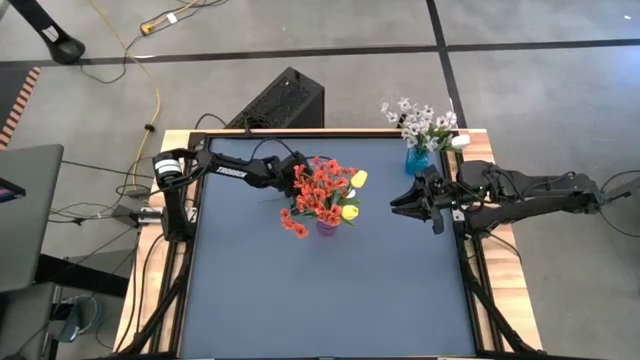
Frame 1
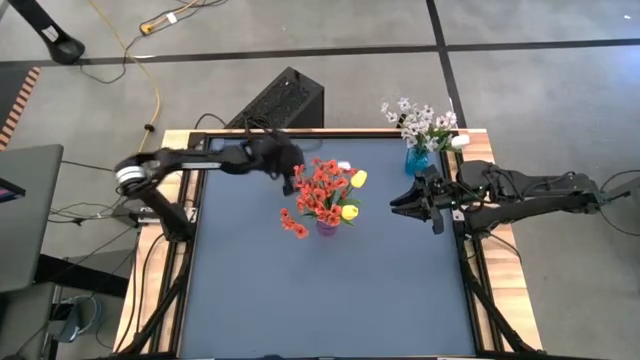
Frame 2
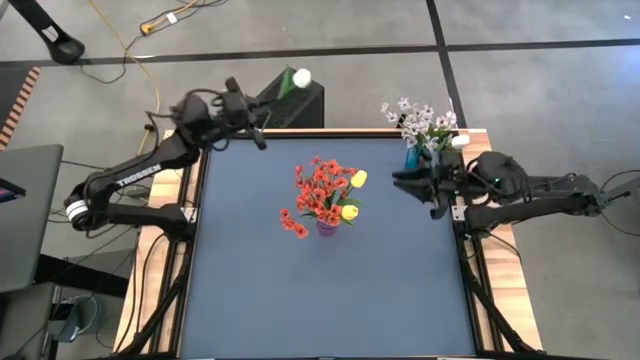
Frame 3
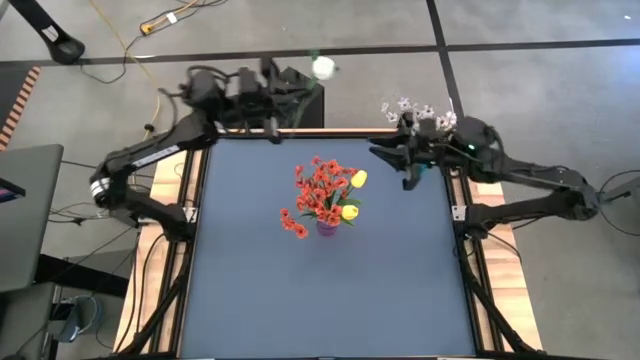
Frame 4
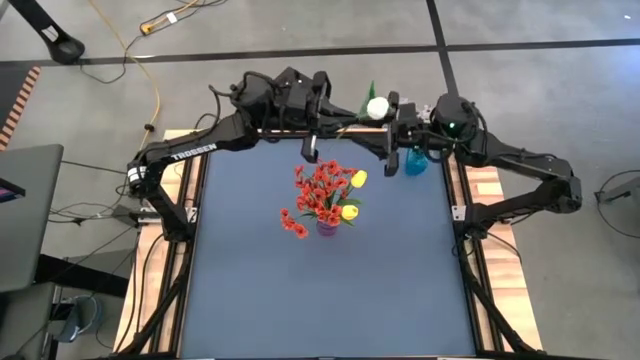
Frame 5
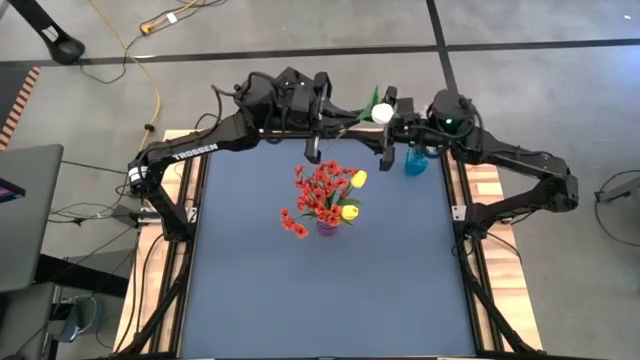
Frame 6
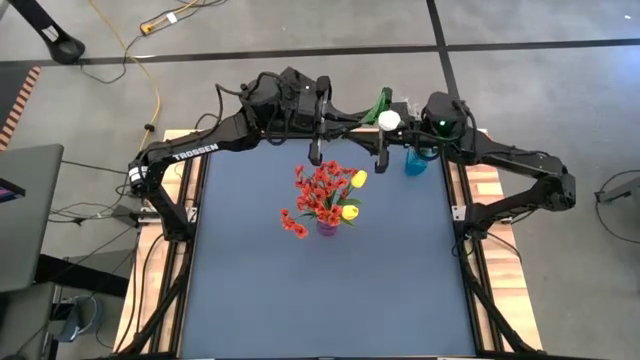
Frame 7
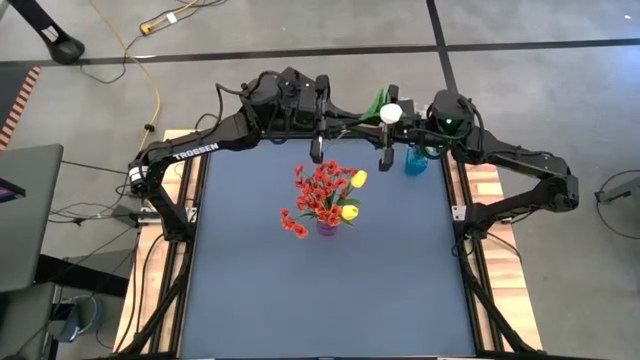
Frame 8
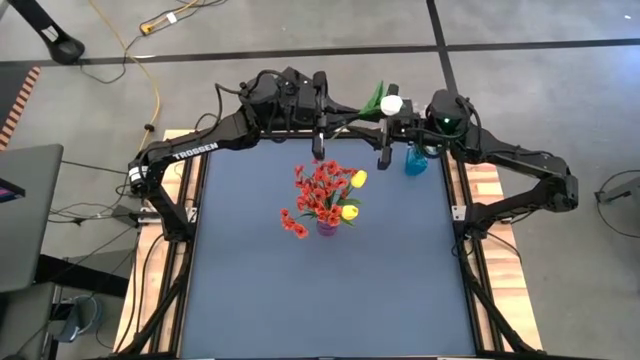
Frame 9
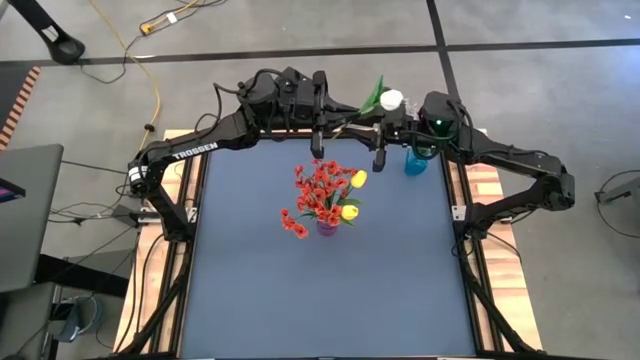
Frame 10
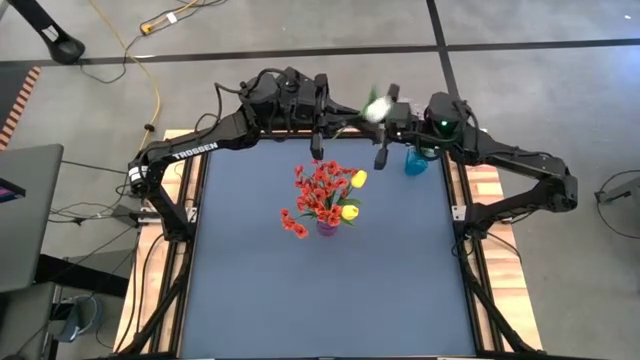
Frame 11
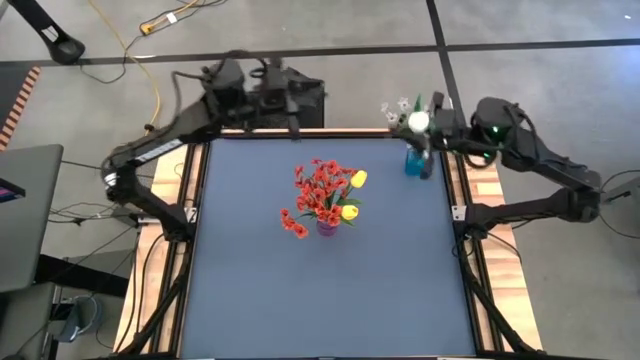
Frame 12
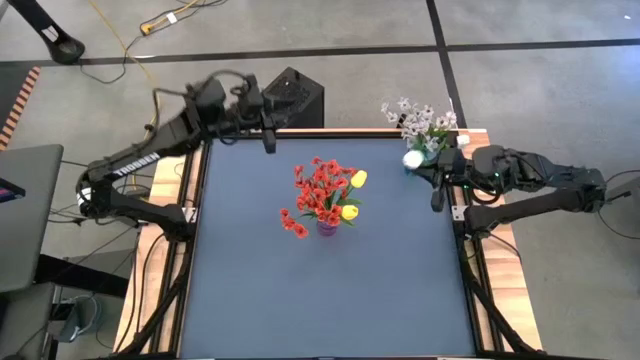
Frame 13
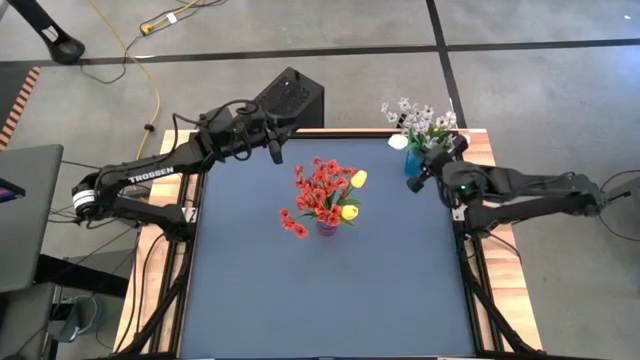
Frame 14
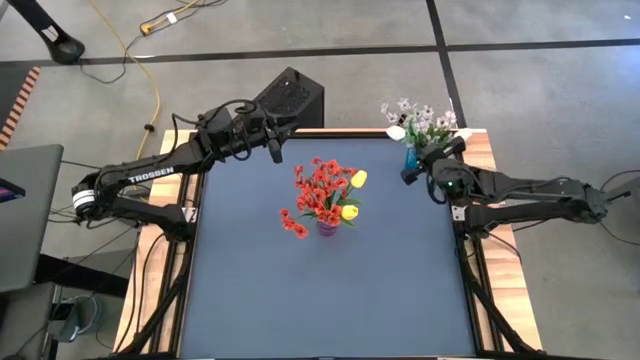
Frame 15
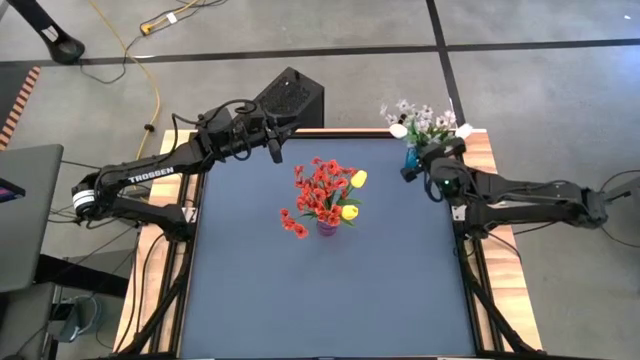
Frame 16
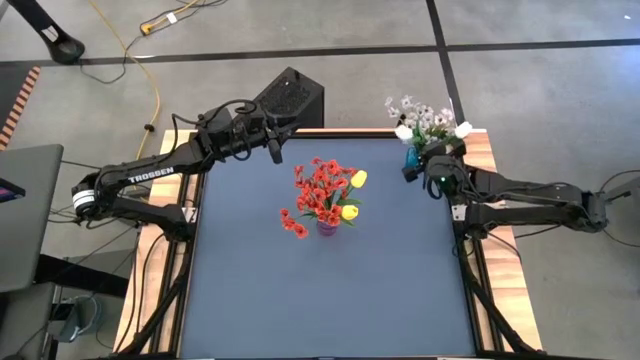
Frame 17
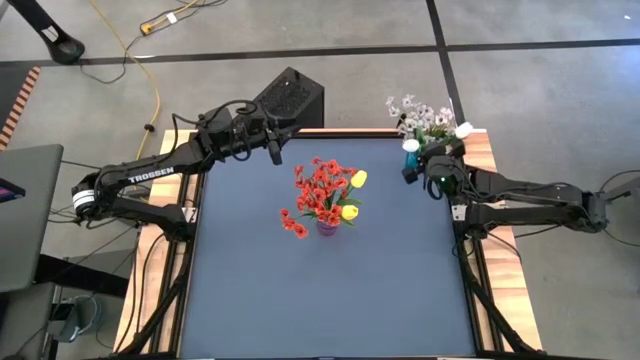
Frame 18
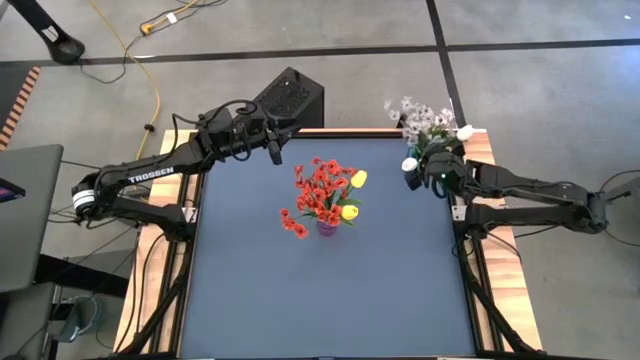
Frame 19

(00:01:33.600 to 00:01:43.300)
Task: Sort flowers into vase by color
Put the white flower into the blue vase

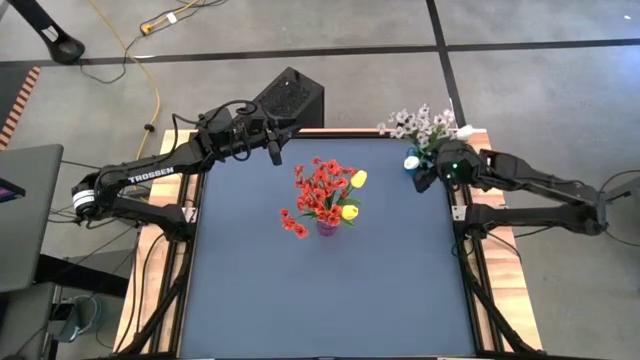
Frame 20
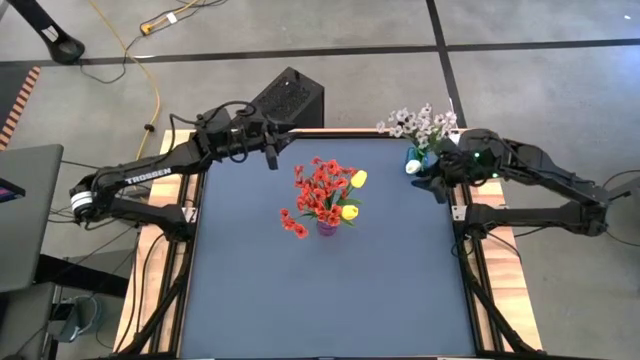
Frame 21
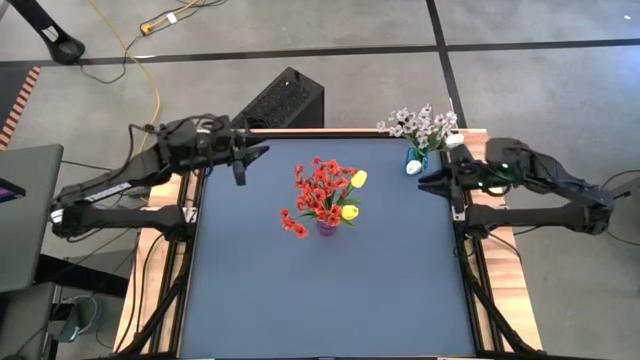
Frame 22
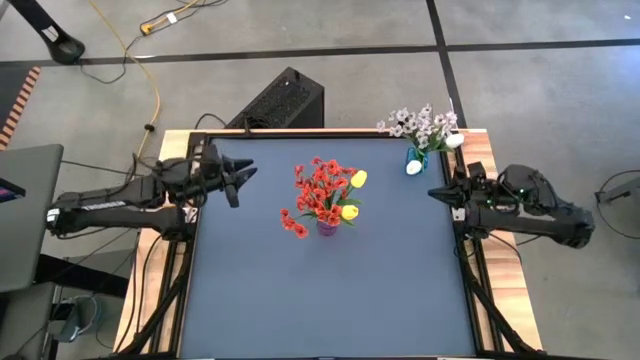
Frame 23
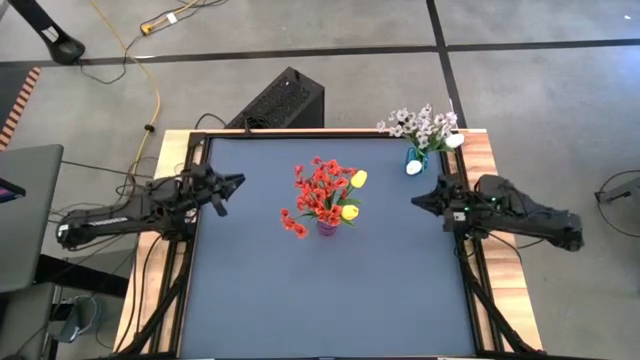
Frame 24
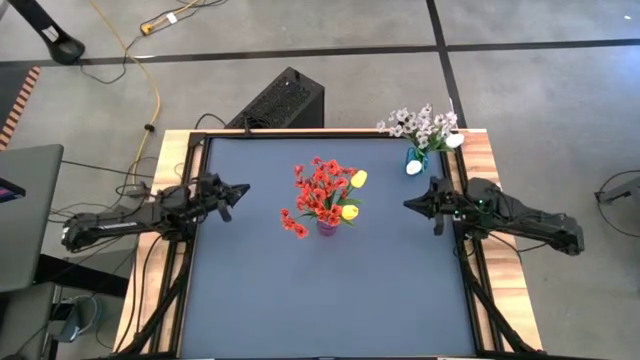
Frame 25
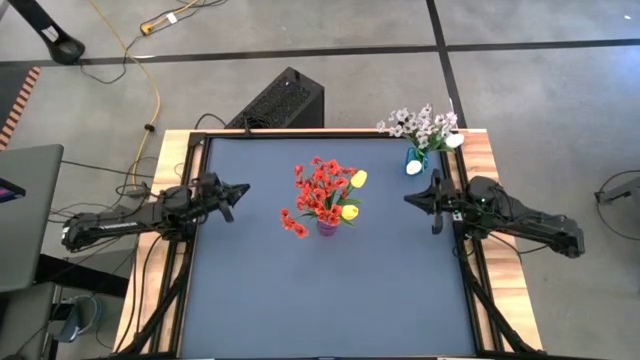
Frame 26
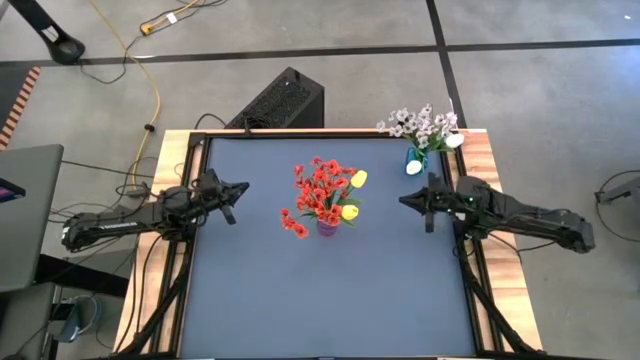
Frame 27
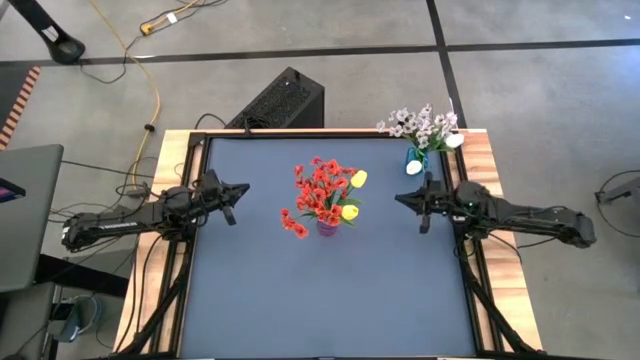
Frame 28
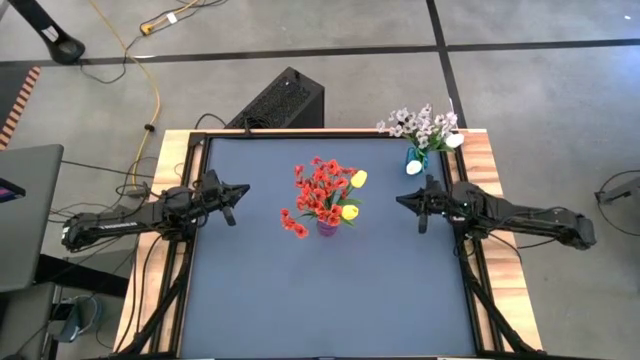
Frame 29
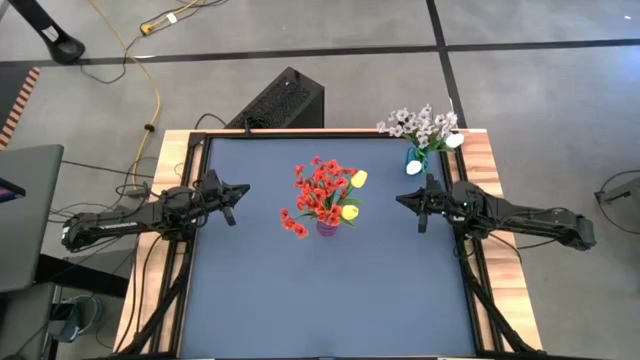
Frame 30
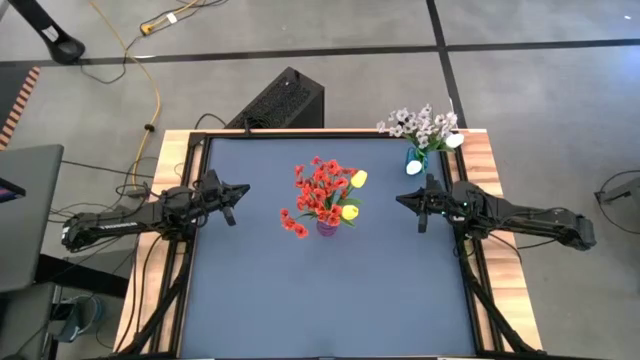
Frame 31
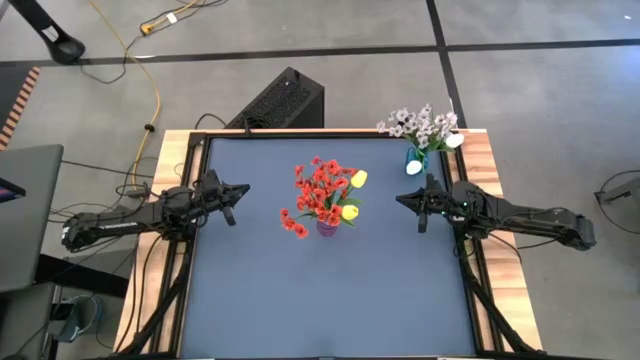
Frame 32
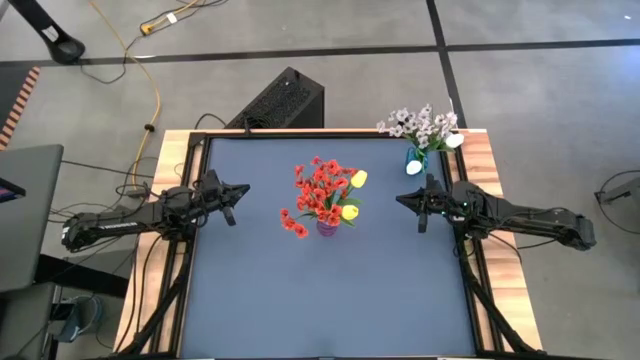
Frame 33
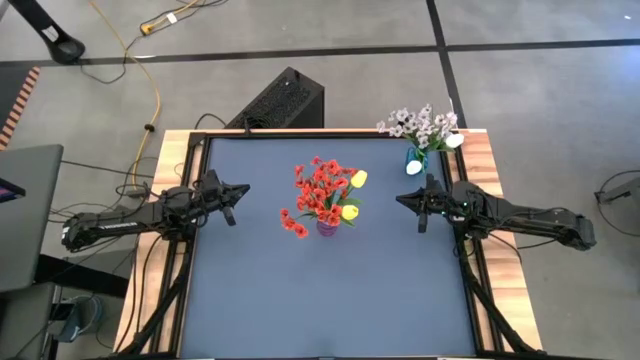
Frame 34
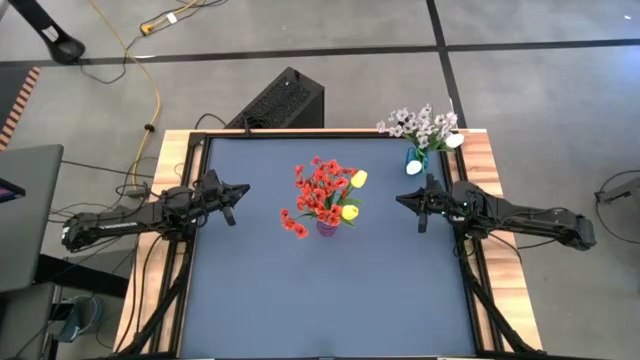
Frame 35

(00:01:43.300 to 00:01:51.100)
Return to Home Position

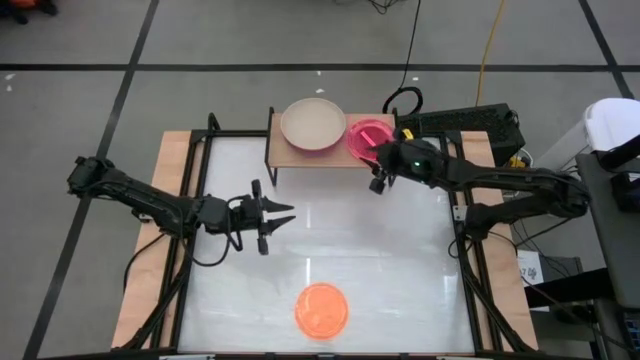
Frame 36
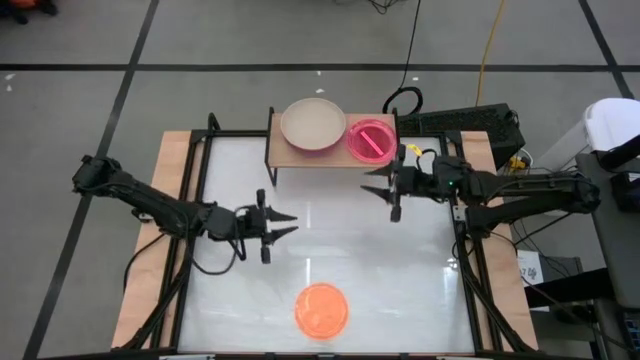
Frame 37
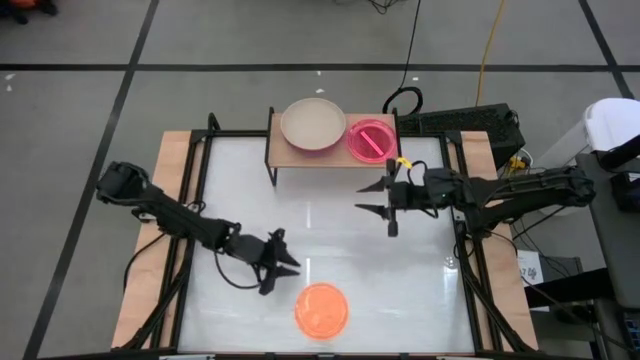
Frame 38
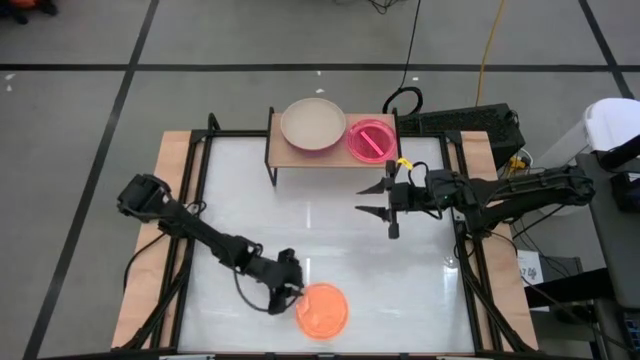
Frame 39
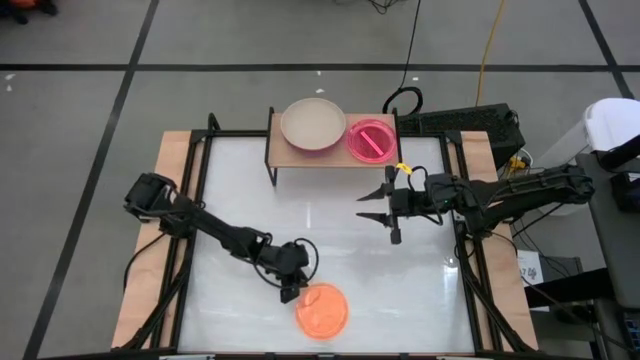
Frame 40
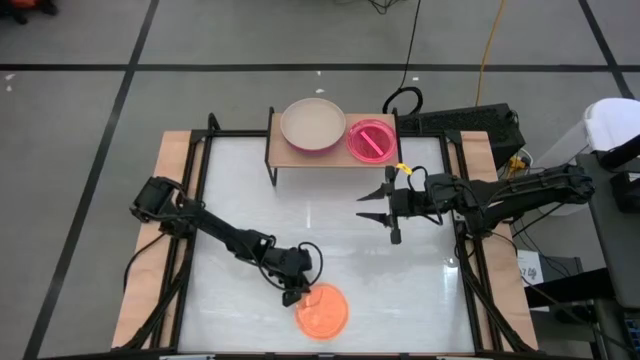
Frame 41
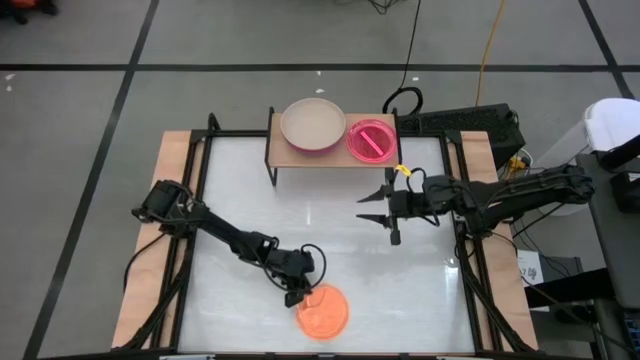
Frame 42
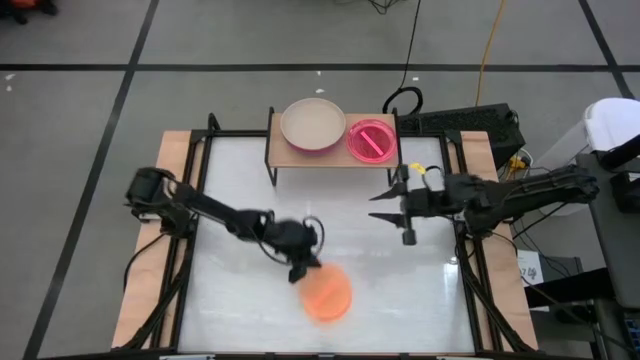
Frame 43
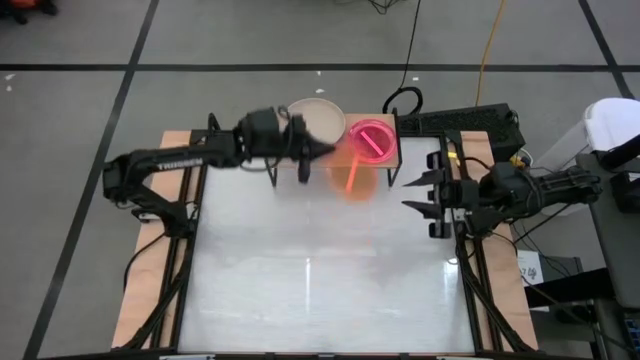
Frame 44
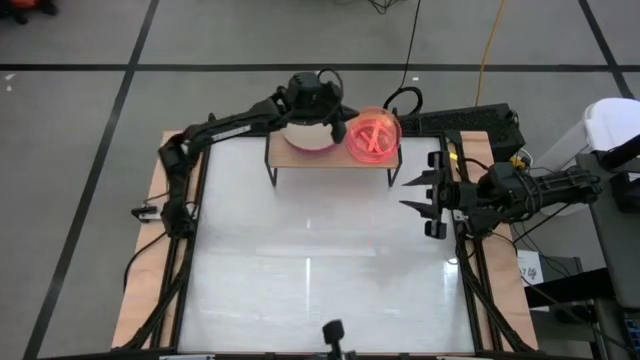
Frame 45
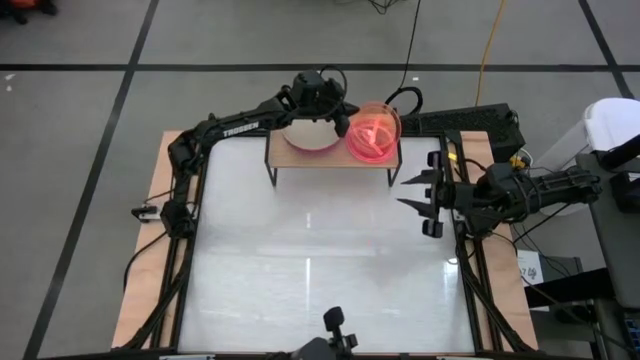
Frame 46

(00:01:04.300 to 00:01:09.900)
Task: Place and stack plates onto a shelf
Stack the orange plate on top of the light pink plate on the shelf
